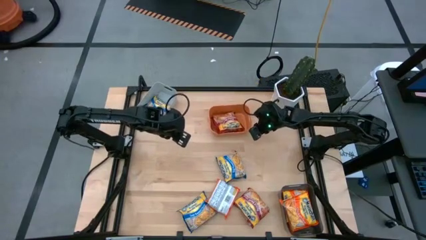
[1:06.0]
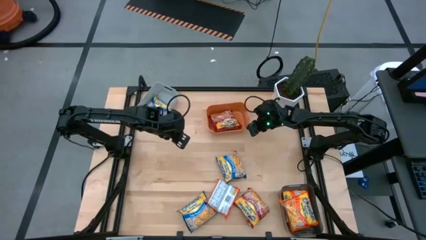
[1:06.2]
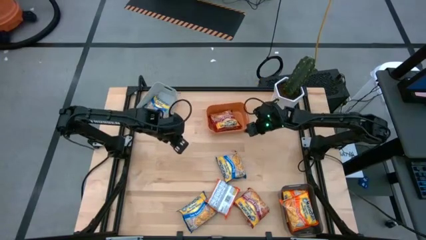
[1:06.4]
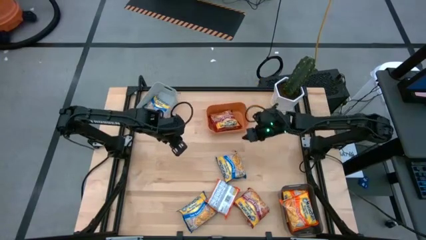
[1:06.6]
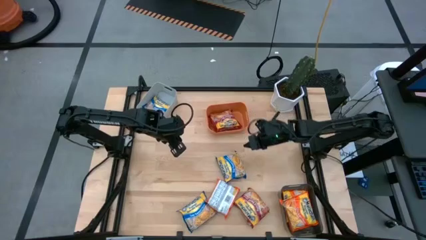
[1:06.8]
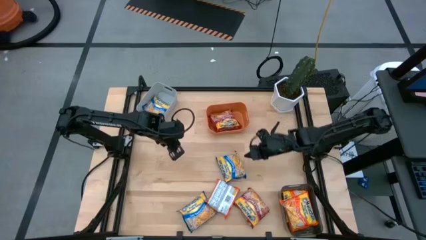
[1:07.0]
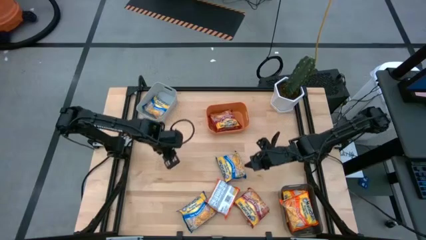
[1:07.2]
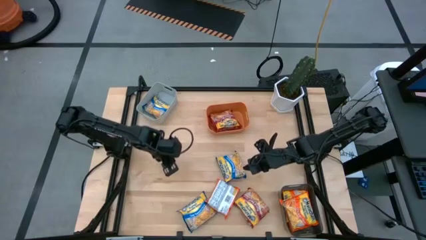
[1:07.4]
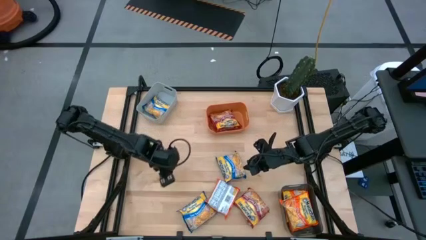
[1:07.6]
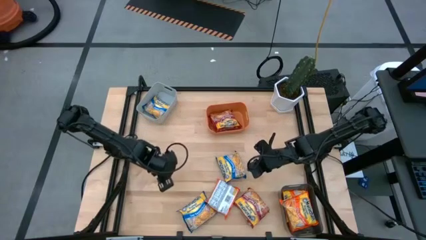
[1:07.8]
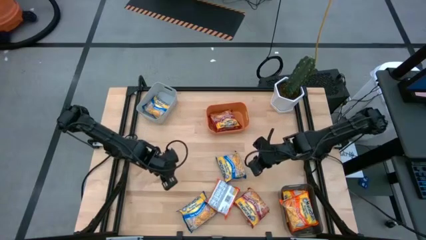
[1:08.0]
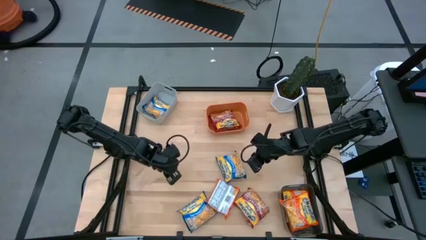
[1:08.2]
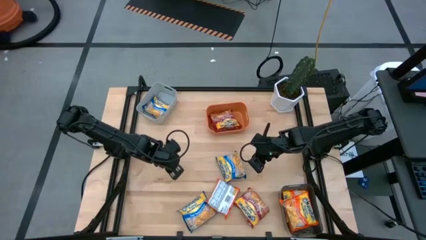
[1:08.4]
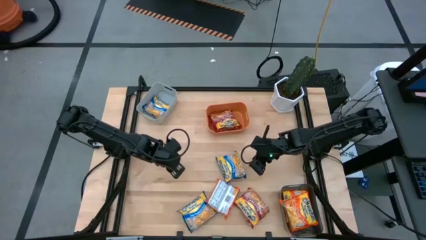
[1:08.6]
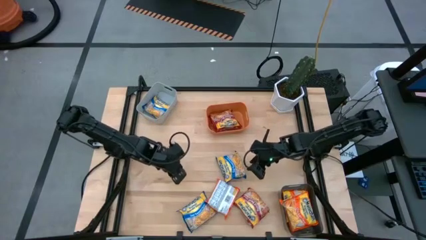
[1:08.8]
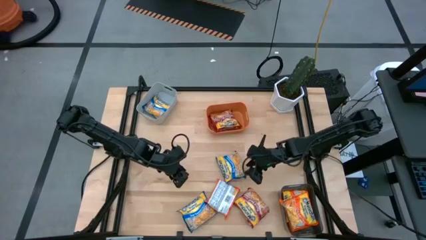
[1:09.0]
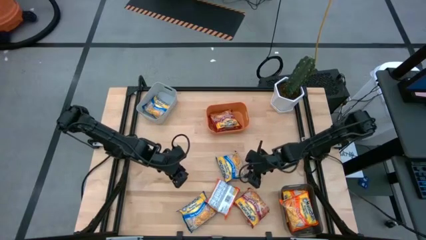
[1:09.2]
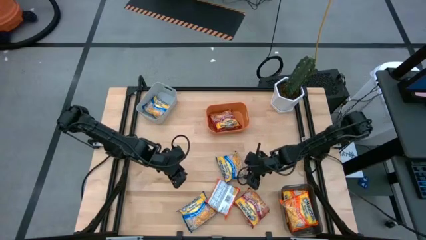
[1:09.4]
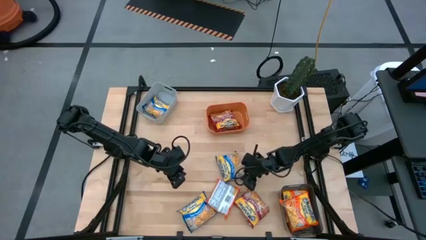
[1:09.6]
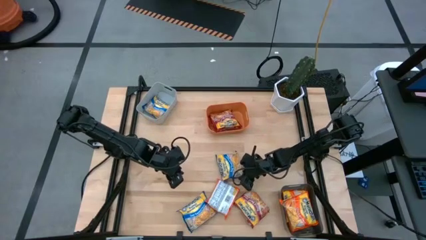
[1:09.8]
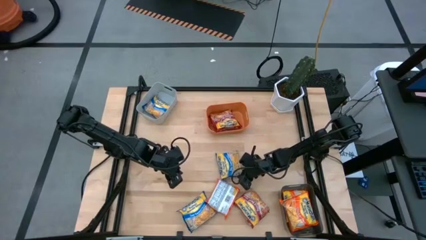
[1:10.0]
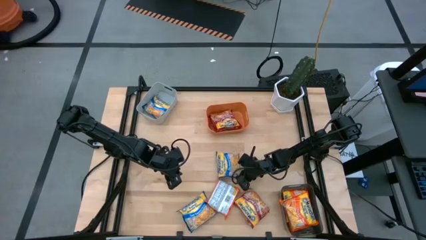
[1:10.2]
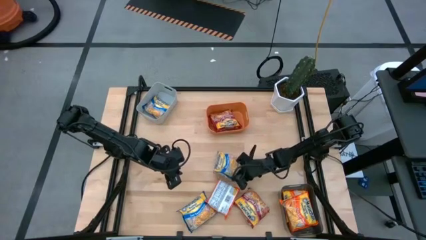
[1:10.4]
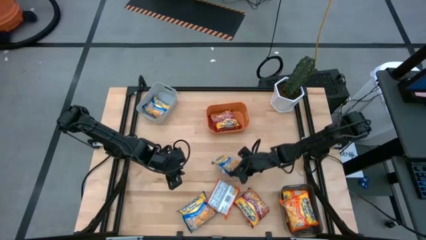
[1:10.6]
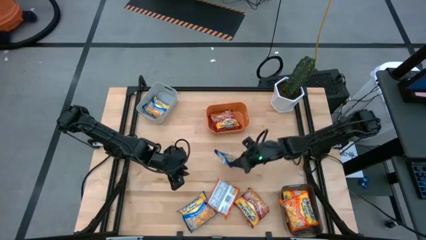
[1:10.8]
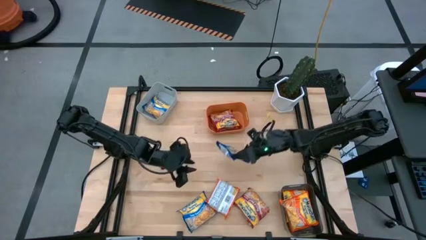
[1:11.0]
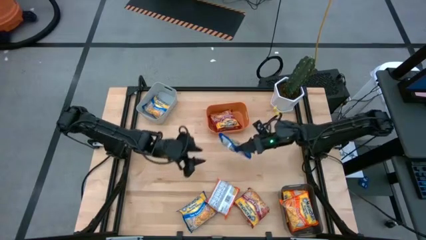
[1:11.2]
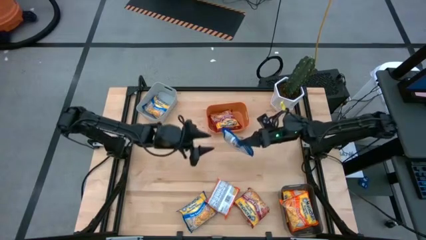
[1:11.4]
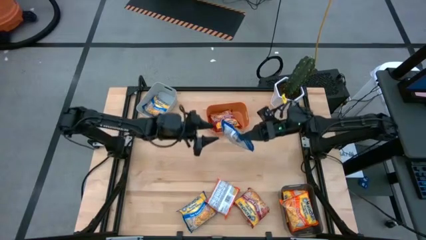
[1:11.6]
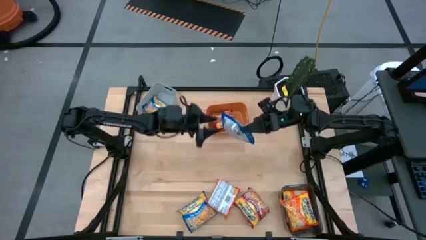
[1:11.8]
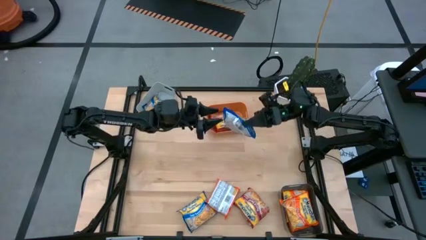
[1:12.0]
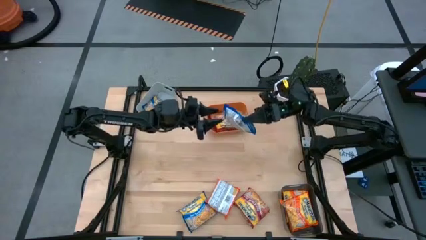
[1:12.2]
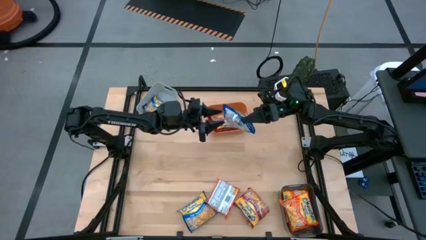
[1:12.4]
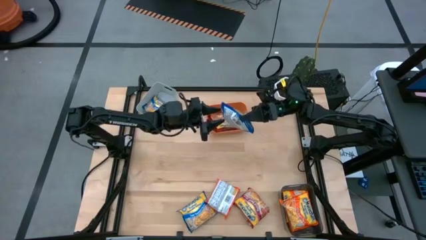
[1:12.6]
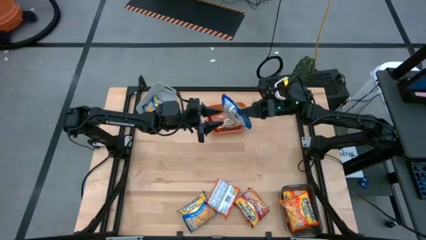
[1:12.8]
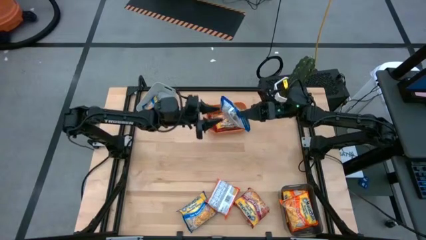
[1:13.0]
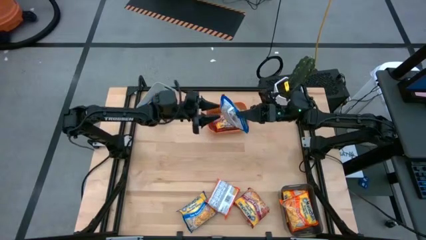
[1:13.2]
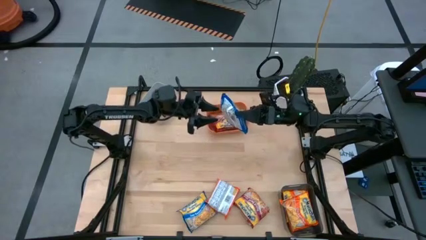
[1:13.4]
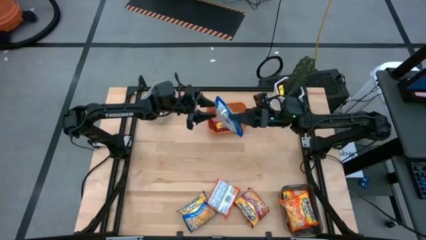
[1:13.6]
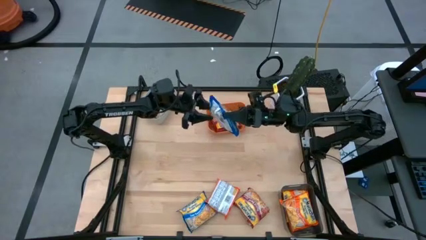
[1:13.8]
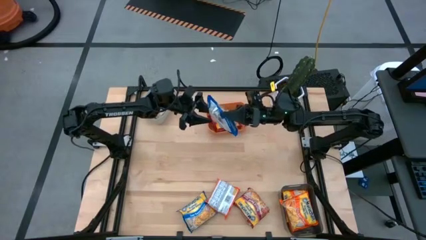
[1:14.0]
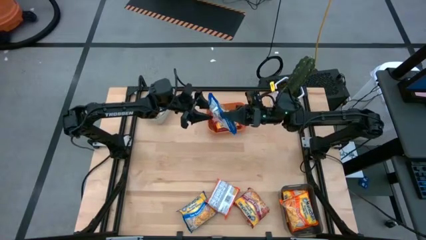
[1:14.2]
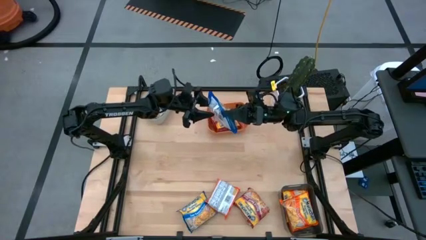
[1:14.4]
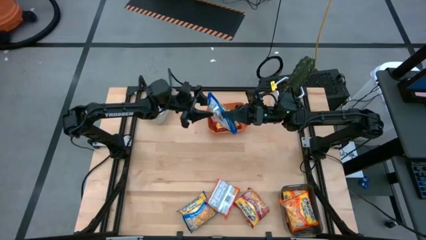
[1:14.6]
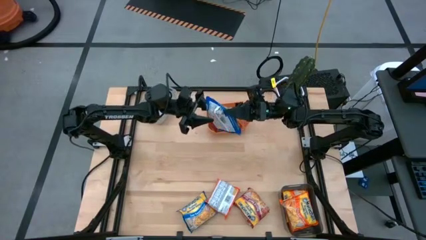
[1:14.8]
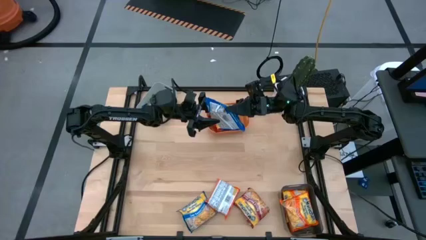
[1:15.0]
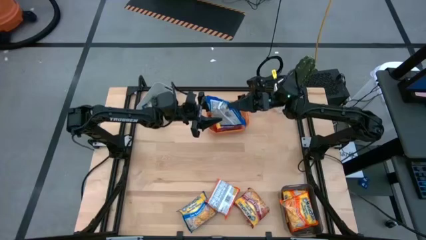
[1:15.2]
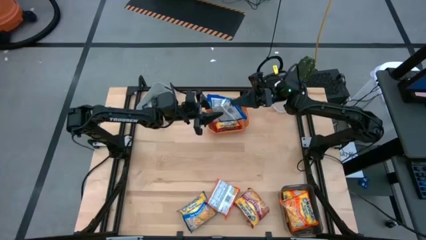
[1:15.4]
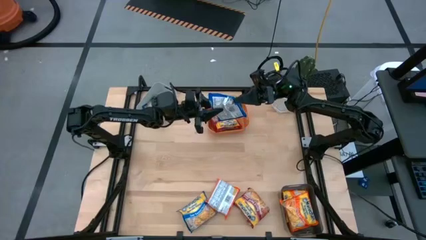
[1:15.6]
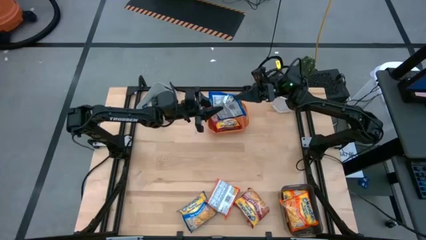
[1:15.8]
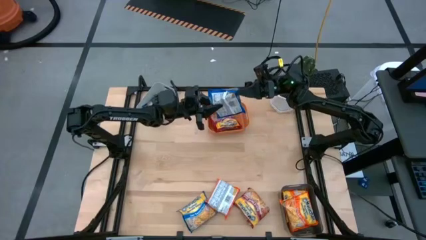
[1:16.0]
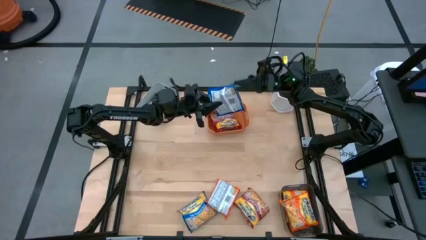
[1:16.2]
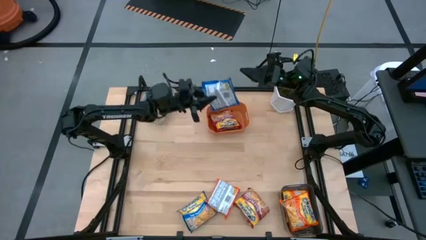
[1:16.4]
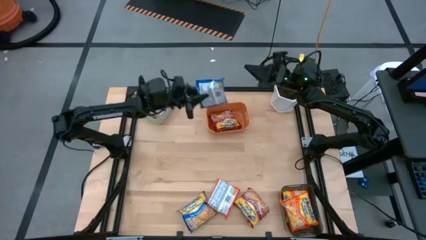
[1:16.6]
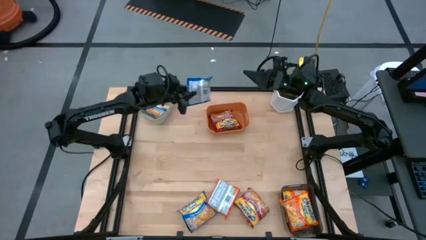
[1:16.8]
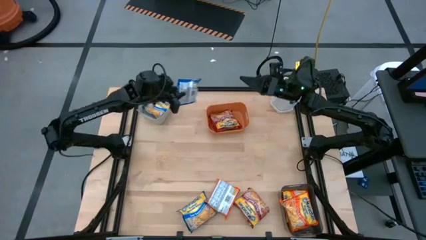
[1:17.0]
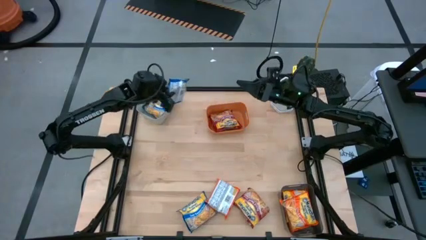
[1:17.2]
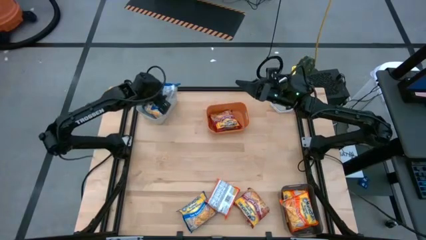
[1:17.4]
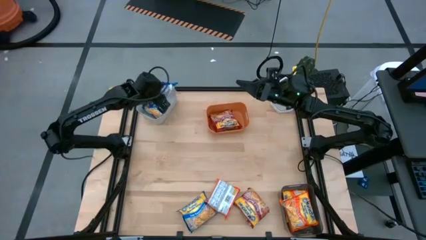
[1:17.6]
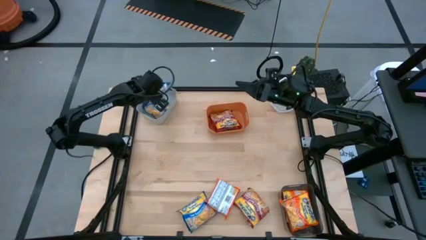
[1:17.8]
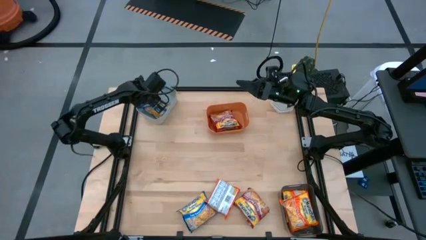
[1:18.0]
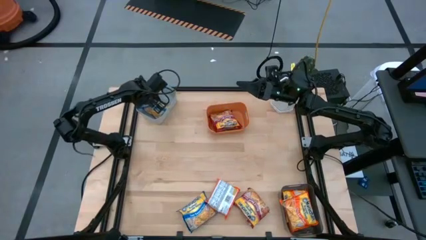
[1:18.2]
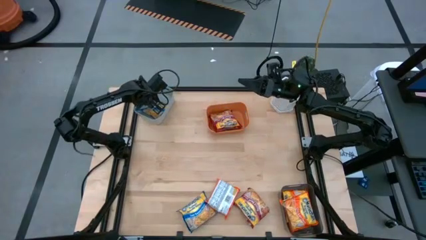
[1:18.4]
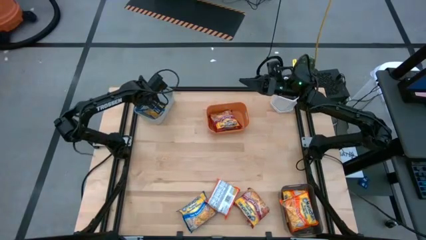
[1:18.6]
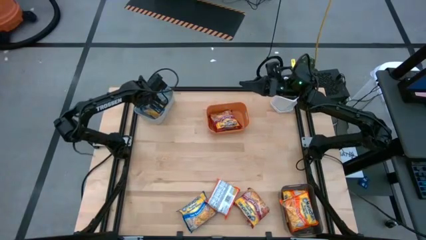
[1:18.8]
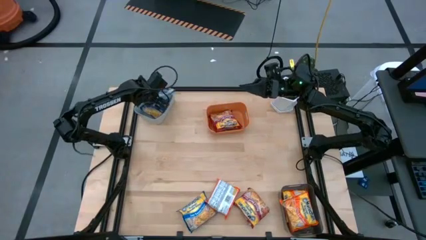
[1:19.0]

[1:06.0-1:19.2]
Task: Sort Maruchan noodles
Put the top blue noodle pack into the gray bin

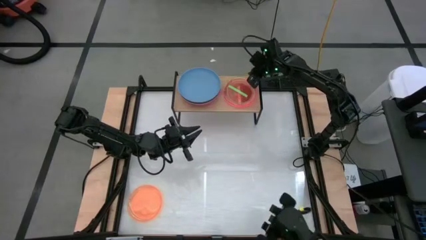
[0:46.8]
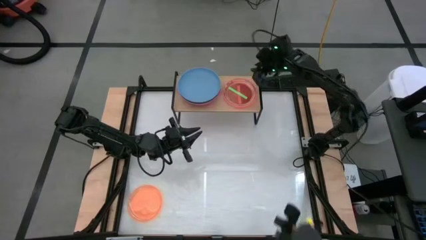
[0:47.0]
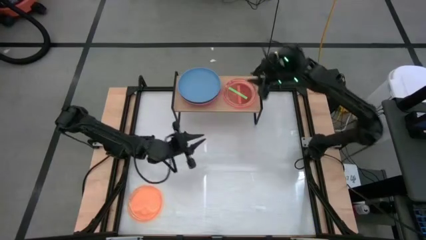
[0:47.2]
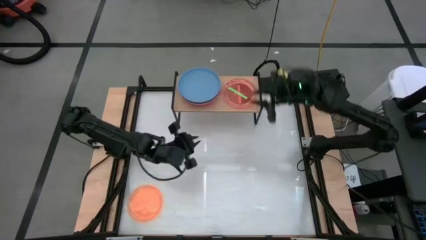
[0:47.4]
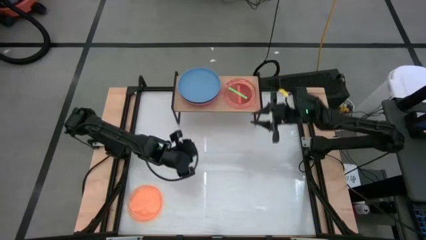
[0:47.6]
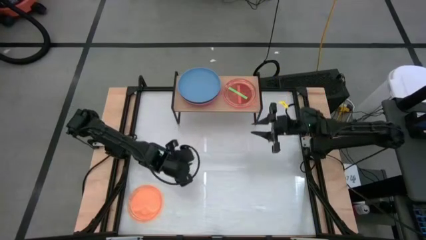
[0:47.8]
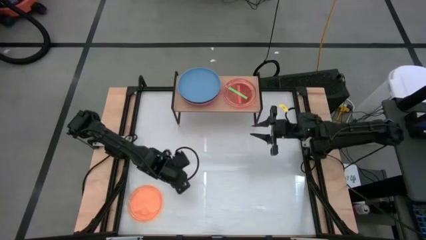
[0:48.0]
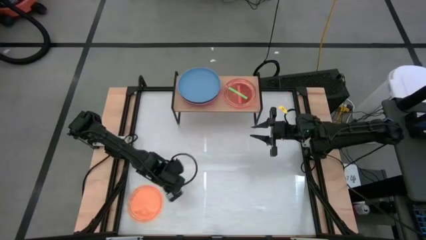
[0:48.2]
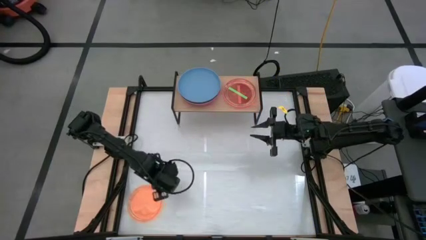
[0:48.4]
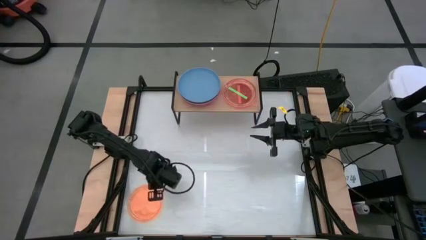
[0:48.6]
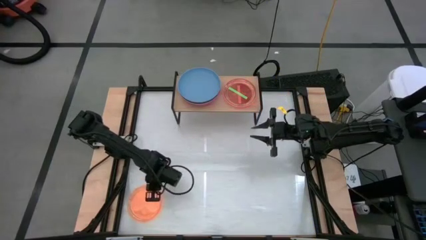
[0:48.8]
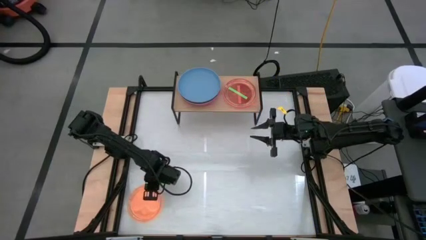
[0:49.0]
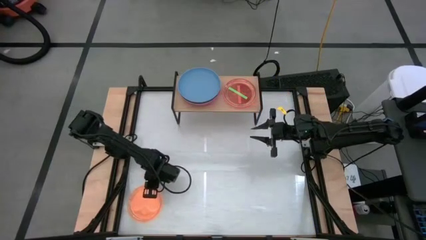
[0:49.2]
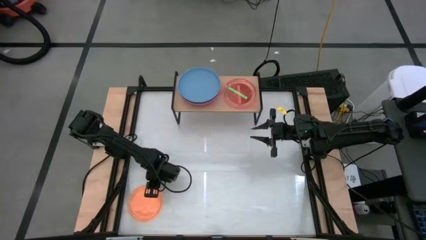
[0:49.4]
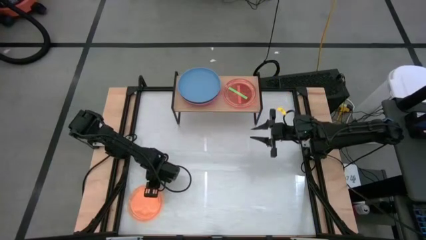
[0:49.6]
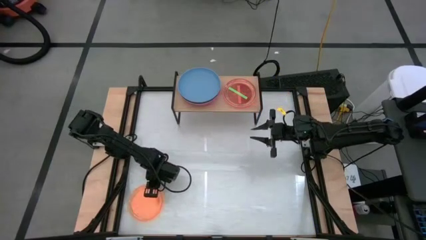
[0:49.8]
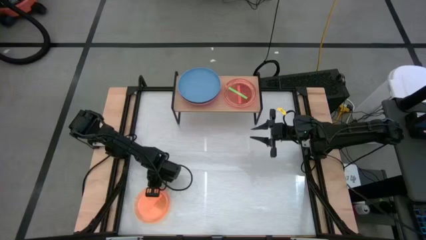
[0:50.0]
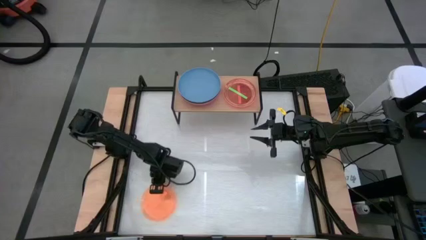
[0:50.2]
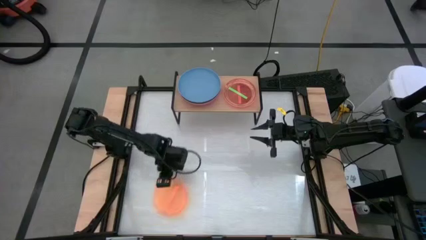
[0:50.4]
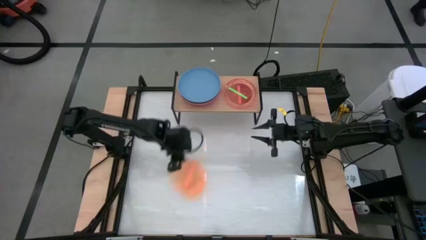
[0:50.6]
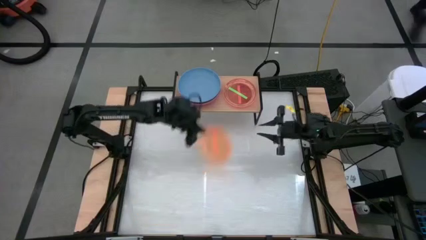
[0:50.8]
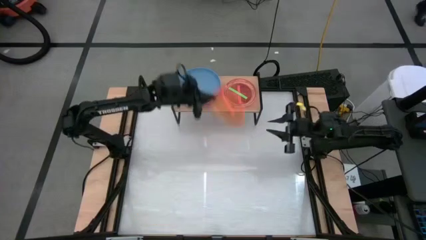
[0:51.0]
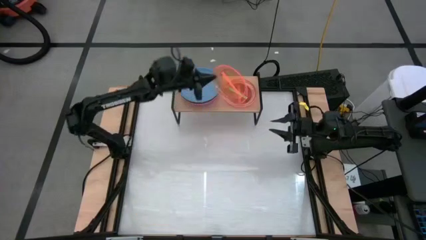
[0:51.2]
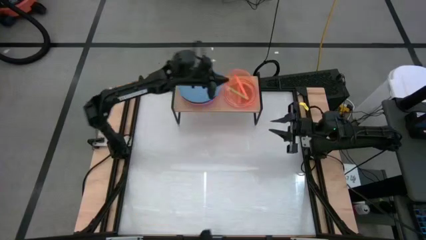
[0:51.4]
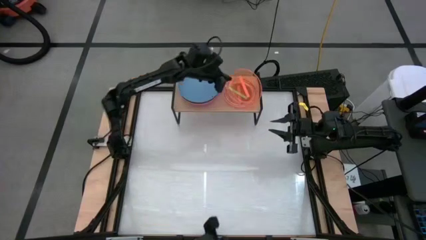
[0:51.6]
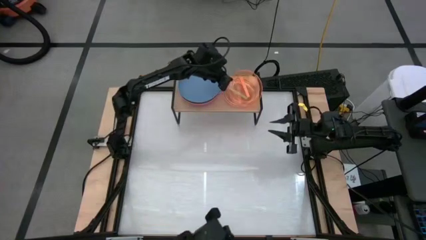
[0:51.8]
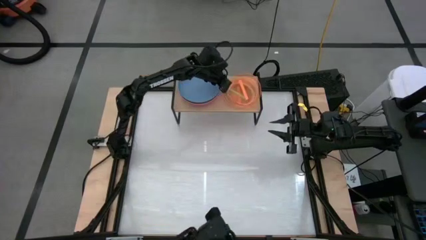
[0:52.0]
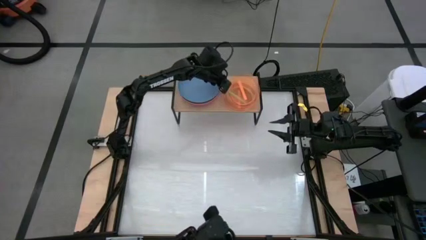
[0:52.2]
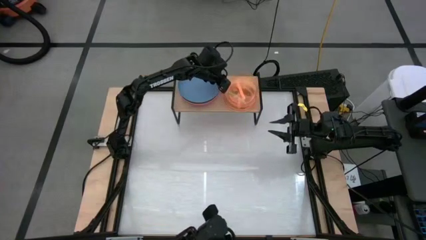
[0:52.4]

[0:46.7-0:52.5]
Task: Place and stack plates onto a shelf
Stack the orange plate on the green plate on the shelf
